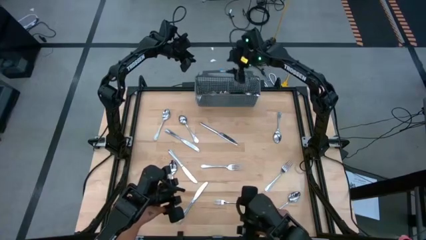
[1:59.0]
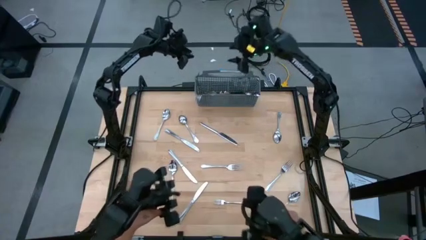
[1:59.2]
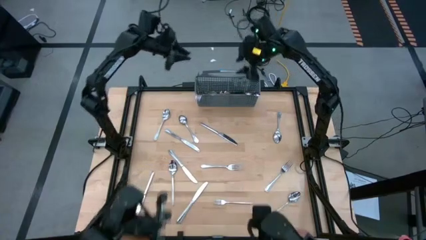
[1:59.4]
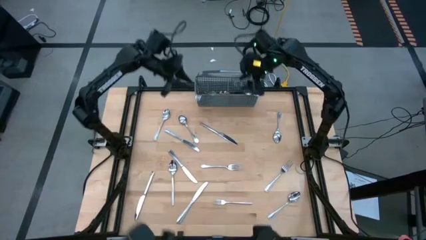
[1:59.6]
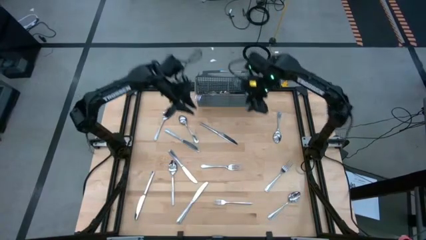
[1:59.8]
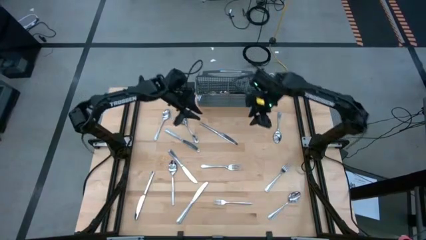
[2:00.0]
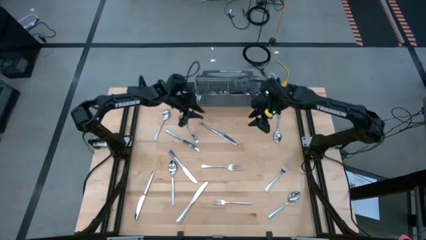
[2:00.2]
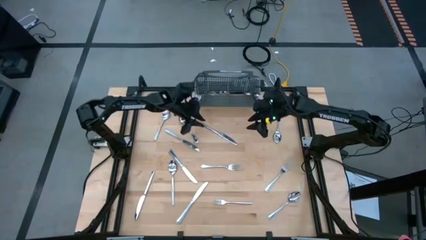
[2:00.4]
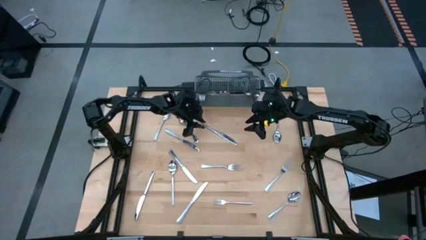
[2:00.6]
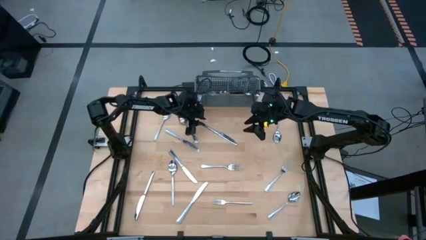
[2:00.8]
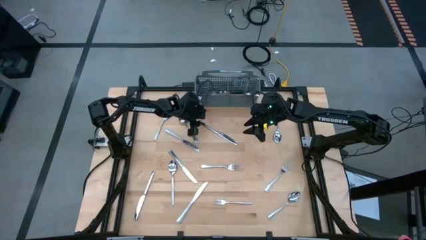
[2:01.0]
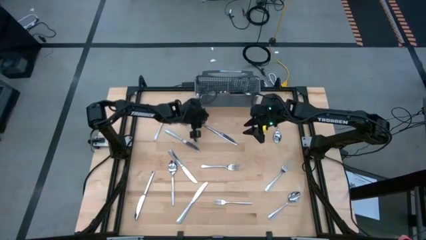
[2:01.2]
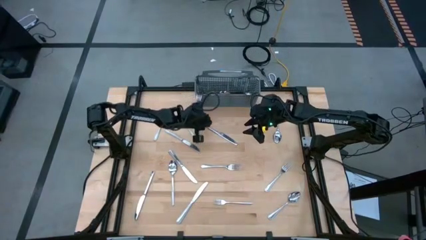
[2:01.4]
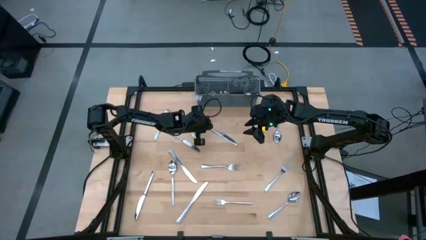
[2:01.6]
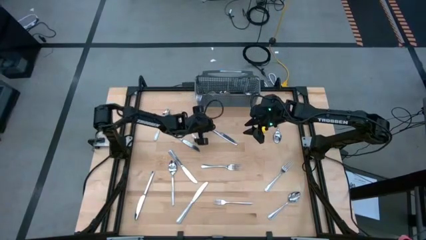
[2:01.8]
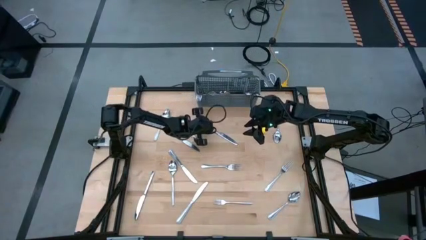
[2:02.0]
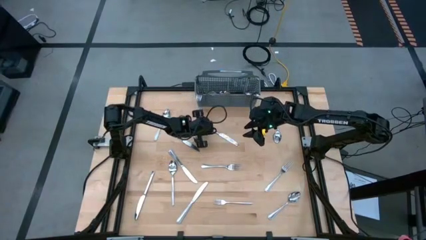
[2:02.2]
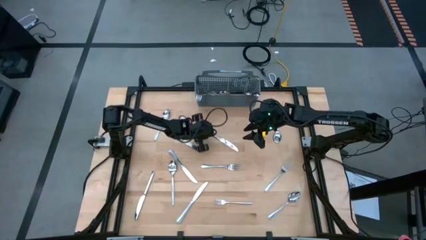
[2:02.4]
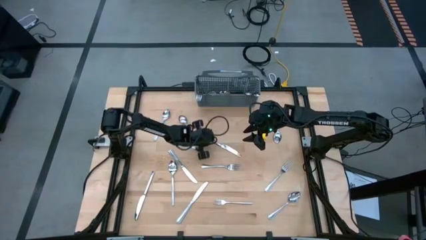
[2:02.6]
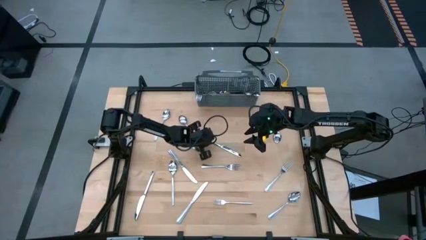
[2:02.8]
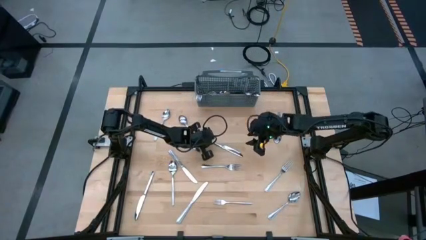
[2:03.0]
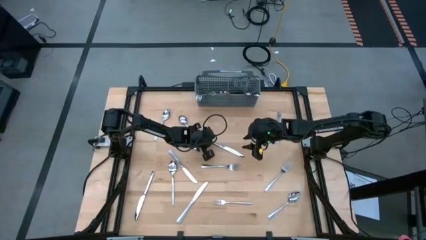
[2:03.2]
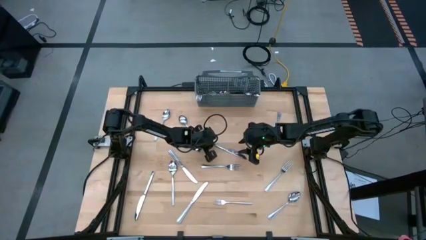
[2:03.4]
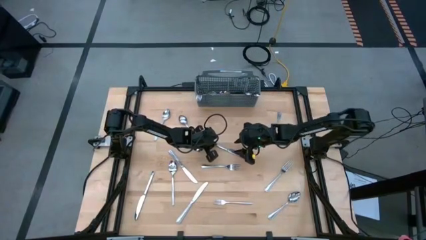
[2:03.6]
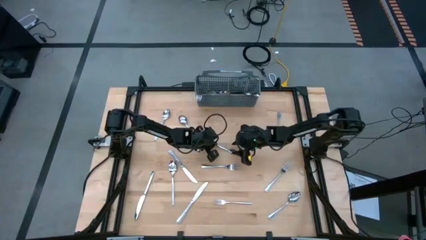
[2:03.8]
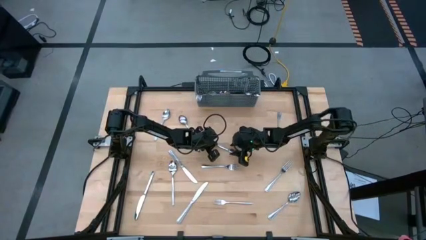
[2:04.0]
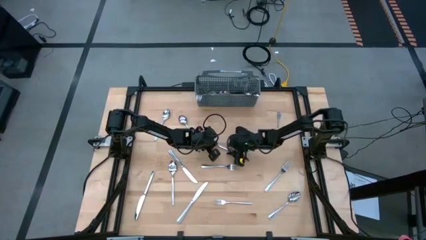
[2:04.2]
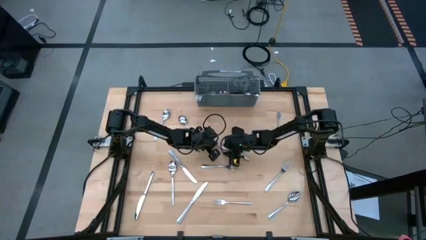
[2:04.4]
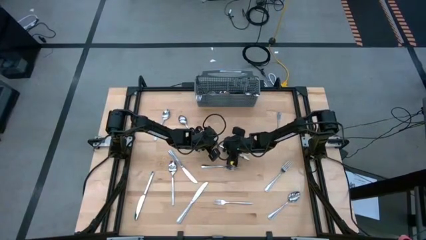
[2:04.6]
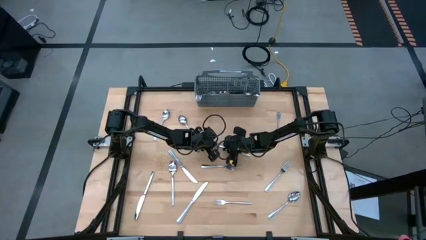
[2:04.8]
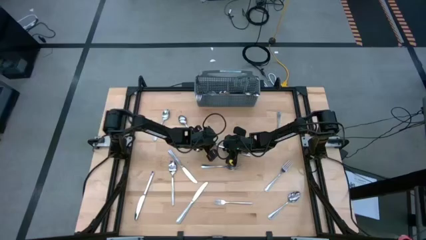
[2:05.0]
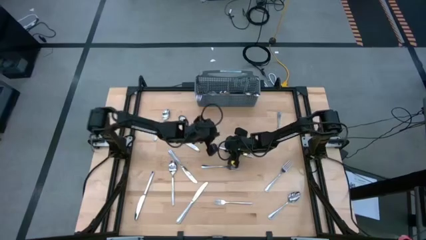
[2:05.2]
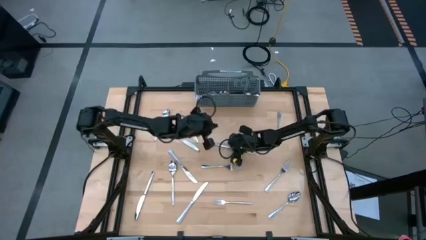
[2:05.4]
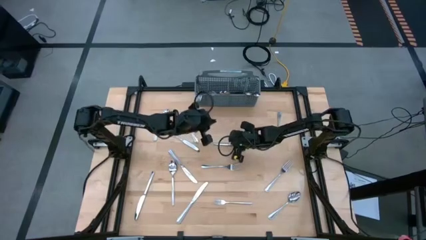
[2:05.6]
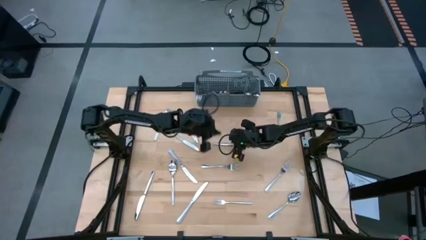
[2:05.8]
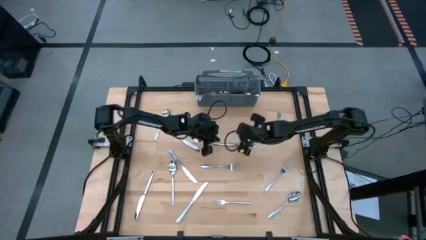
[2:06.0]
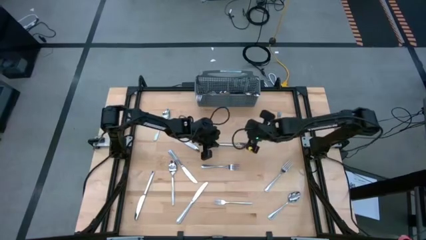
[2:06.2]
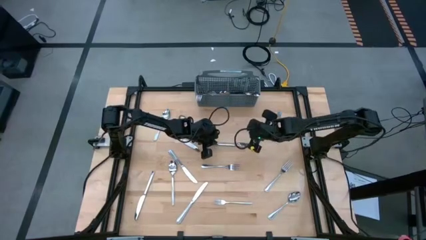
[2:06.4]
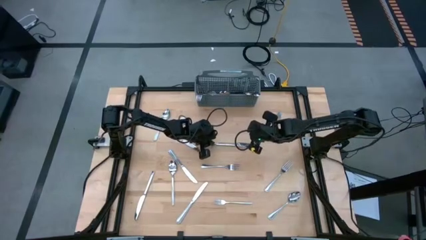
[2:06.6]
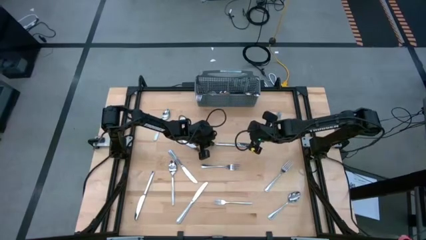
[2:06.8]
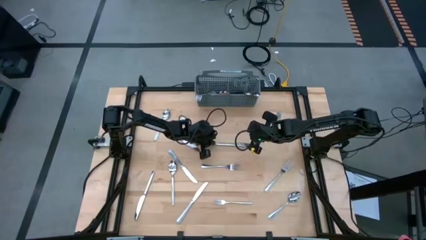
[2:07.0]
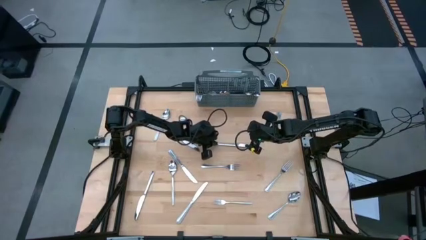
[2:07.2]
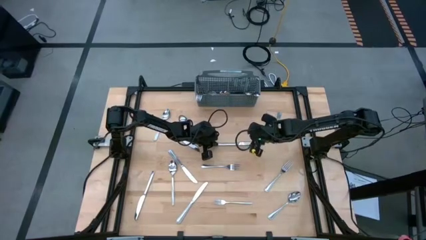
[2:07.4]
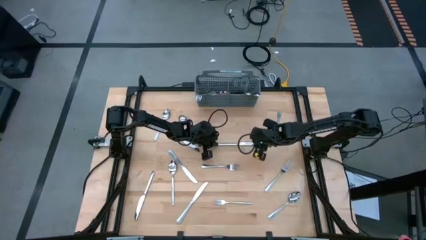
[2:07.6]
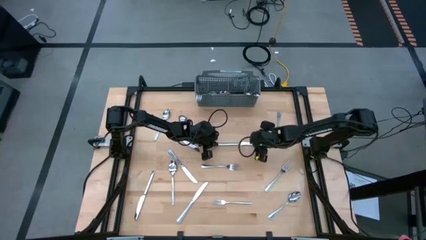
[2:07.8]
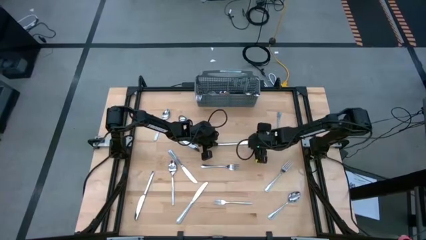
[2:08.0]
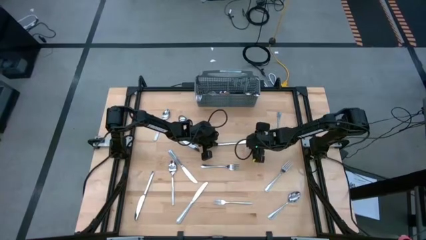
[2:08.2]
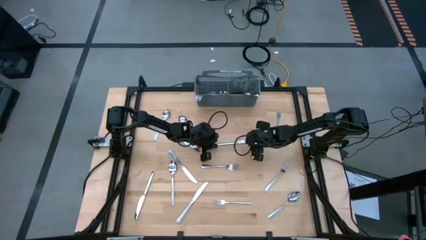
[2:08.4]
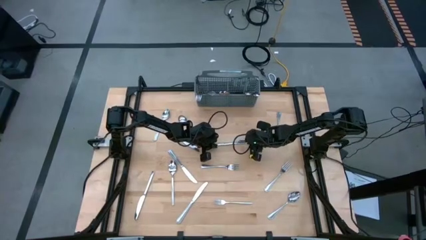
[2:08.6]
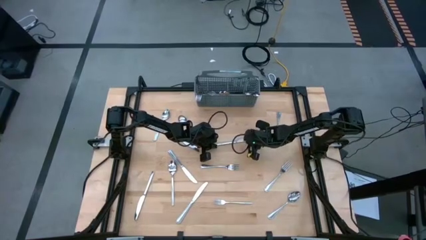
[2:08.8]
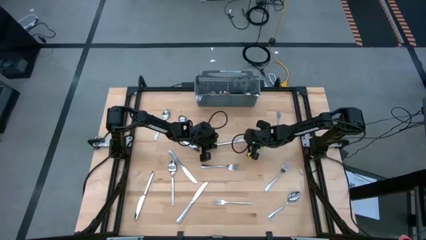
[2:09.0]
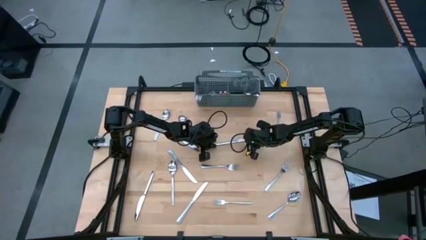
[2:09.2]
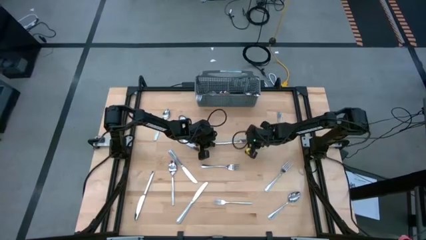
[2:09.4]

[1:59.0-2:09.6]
Task: Sort silverware
Put the silver table knife into the silverware organizer

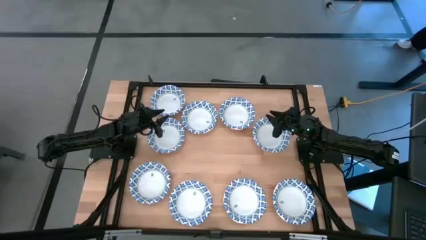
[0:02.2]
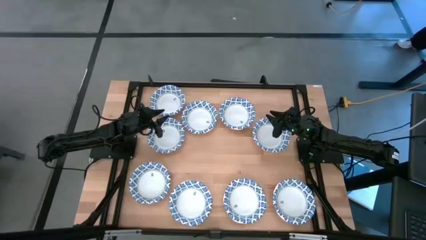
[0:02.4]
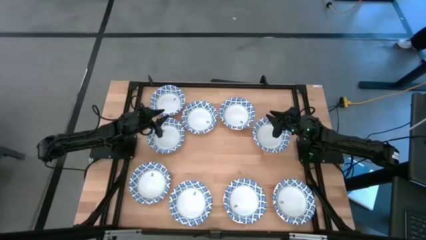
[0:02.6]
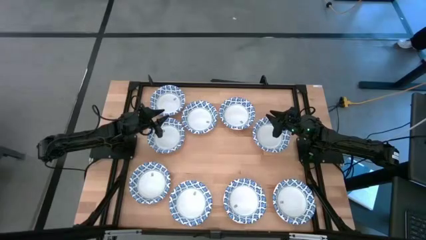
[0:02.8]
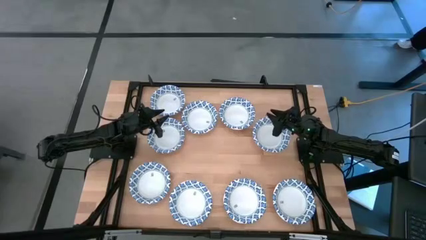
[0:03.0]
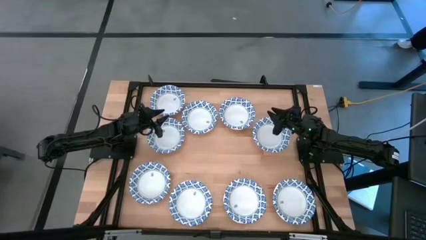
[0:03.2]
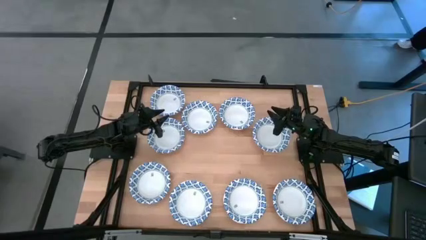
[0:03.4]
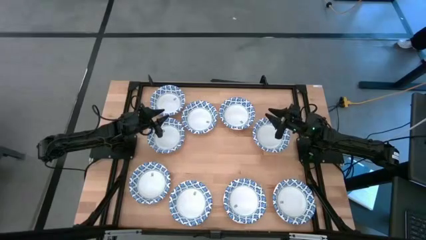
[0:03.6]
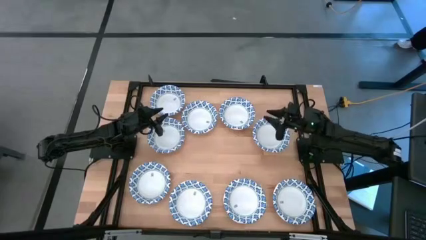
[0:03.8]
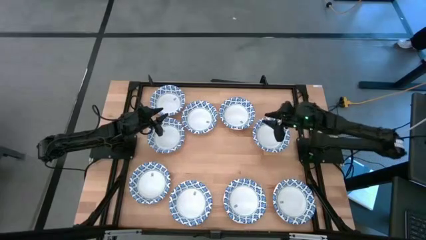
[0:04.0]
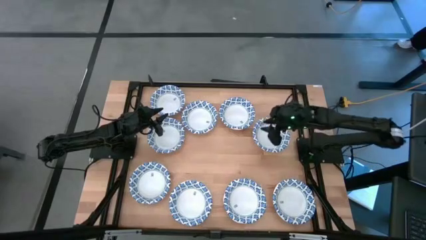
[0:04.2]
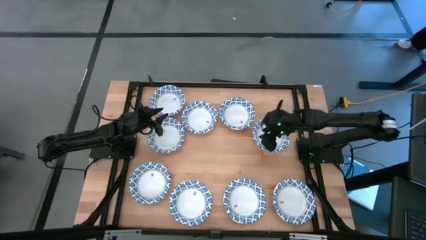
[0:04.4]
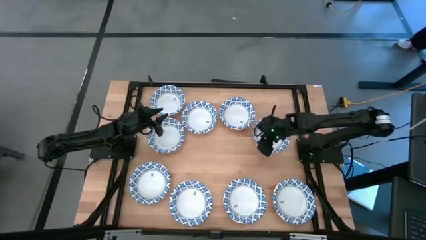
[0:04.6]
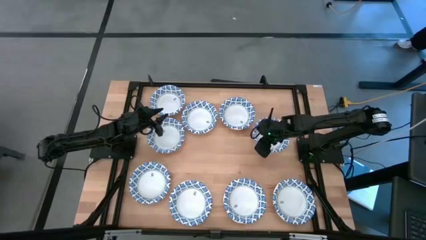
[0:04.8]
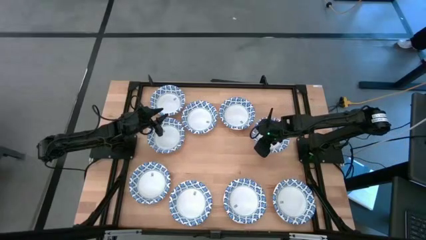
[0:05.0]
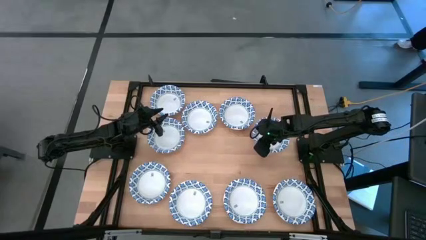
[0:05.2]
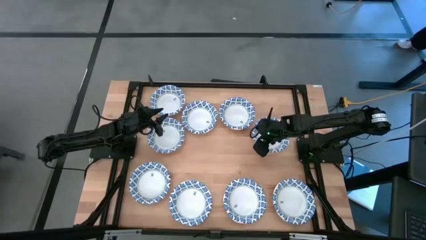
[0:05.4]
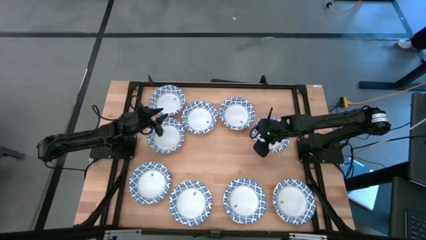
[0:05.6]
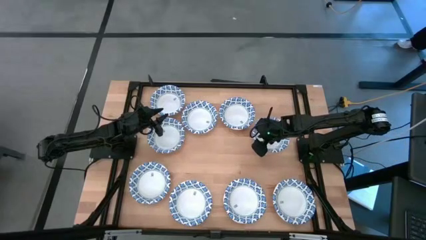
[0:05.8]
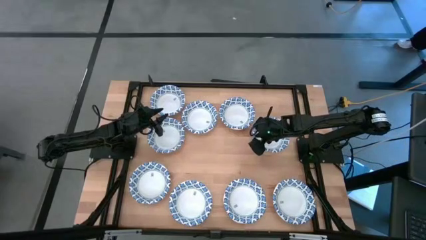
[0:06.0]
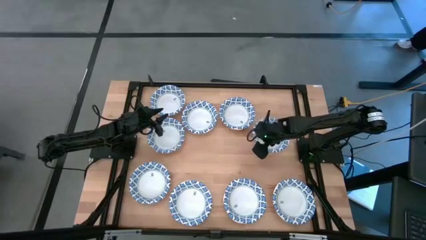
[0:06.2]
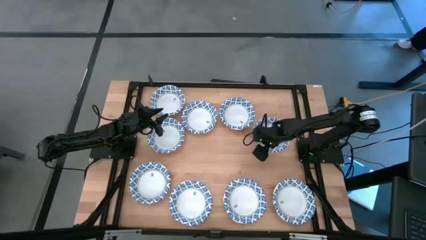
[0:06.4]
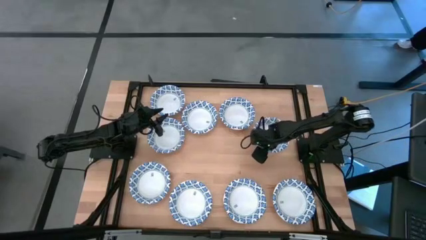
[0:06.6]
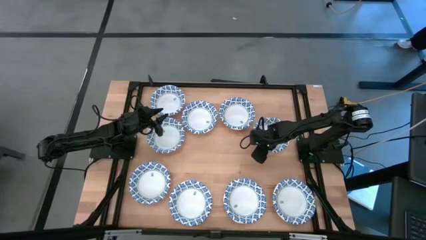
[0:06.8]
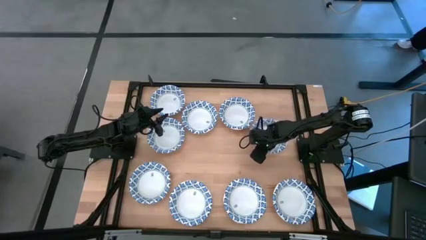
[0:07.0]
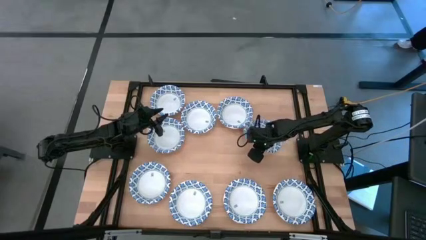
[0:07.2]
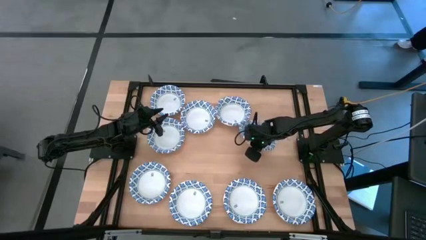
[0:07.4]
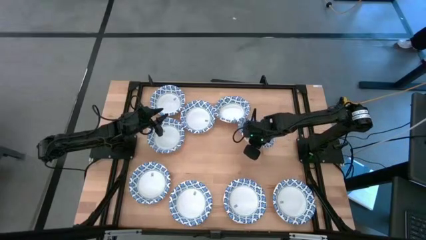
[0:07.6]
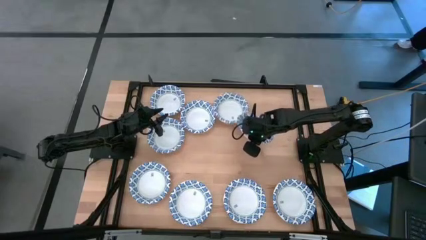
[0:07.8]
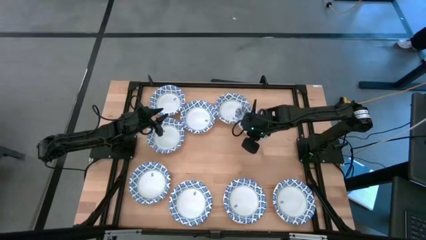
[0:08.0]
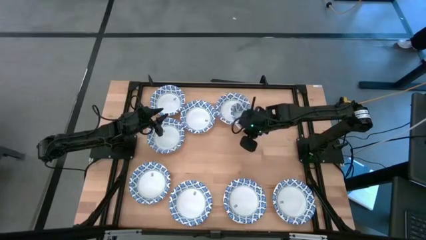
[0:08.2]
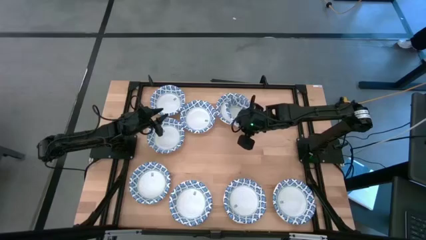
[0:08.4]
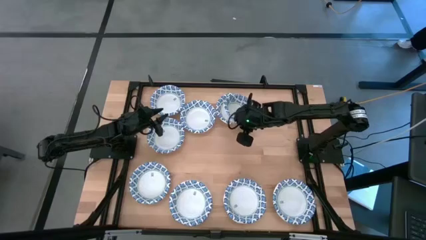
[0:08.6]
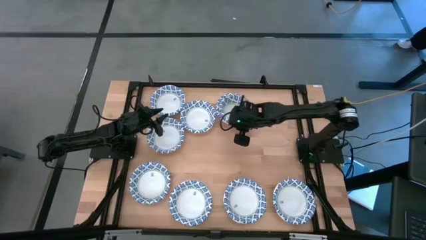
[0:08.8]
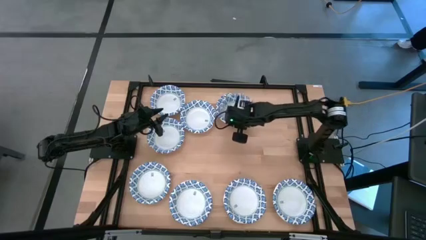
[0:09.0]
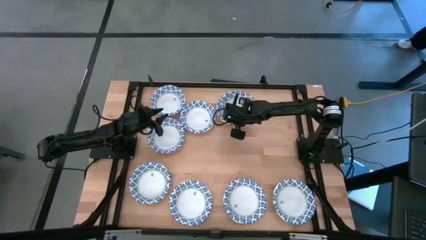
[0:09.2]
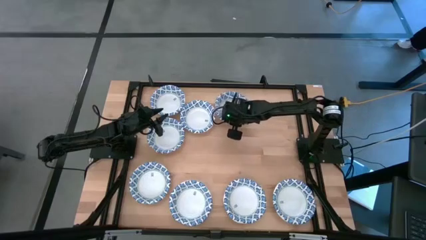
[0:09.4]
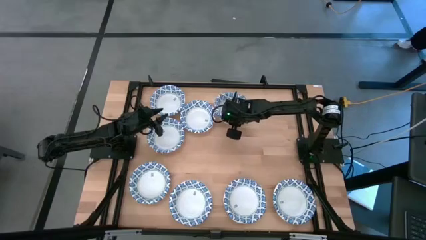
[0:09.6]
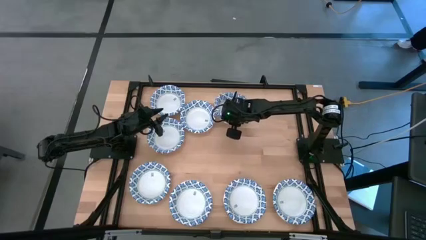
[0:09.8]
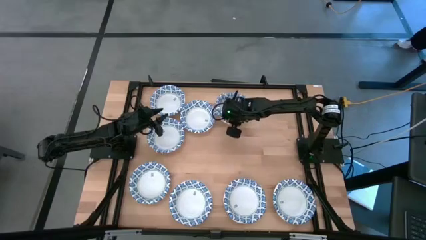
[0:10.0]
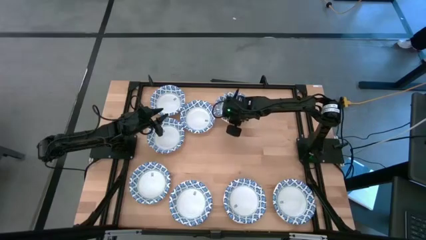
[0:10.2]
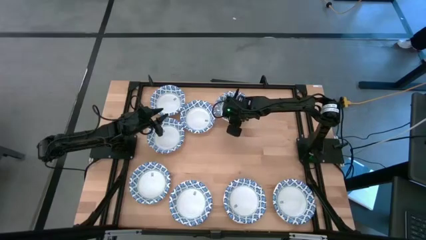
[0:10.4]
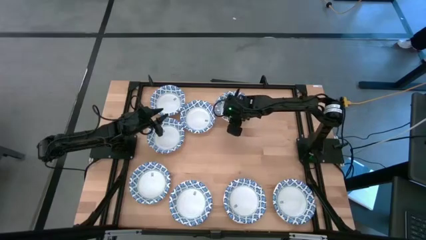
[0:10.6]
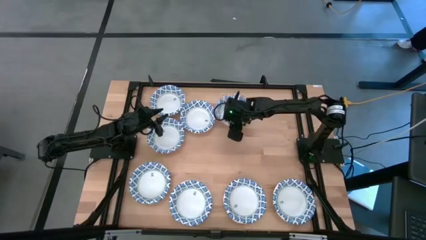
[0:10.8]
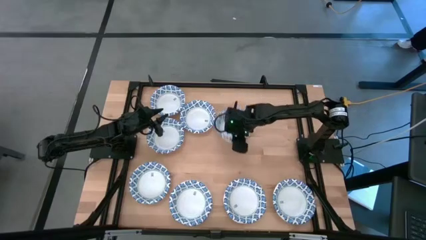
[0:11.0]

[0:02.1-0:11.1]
Task: Nest bowls inside each other
Stack the blue patterned bowl on top of the other blue patterned bowl
